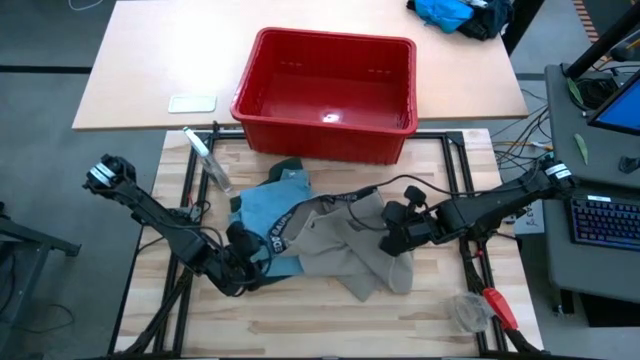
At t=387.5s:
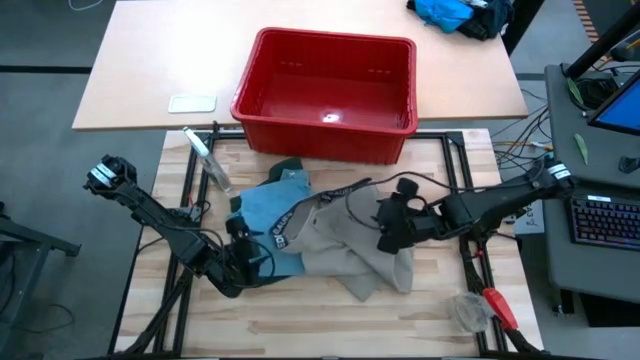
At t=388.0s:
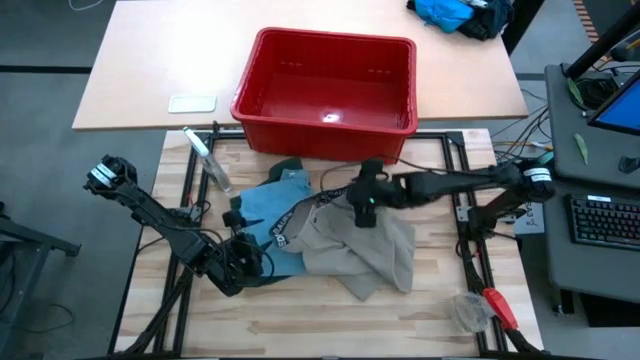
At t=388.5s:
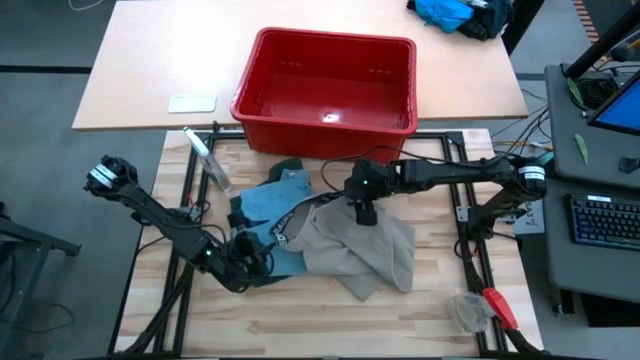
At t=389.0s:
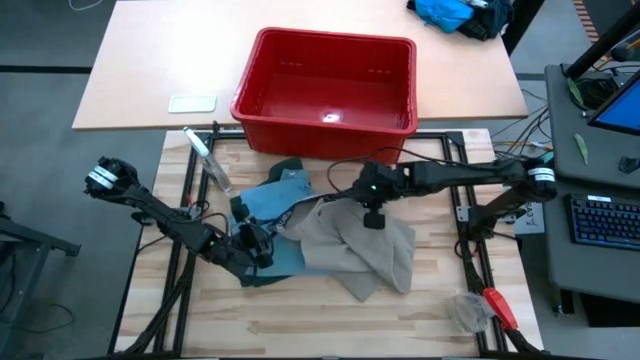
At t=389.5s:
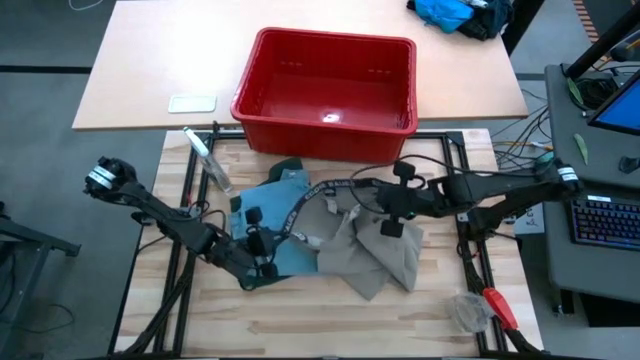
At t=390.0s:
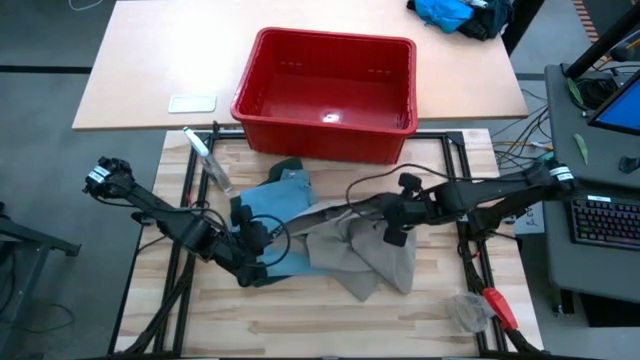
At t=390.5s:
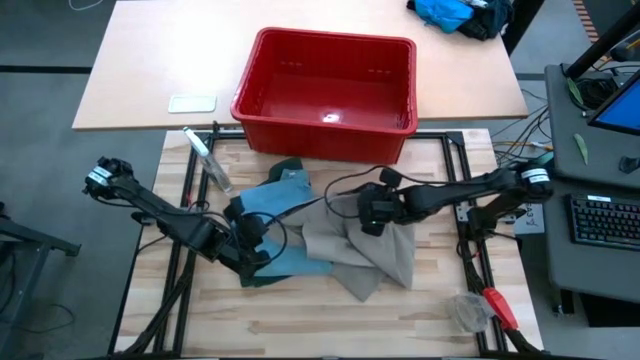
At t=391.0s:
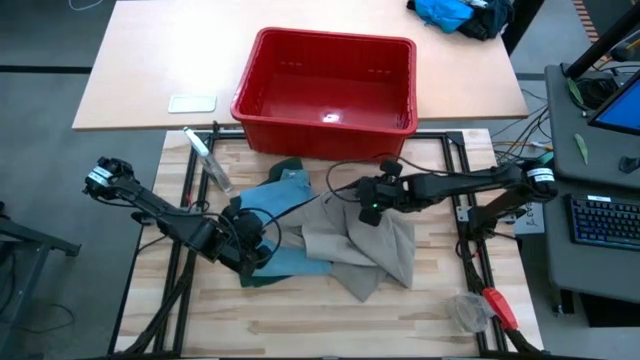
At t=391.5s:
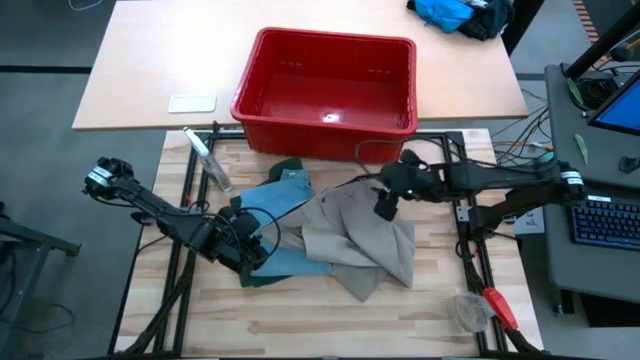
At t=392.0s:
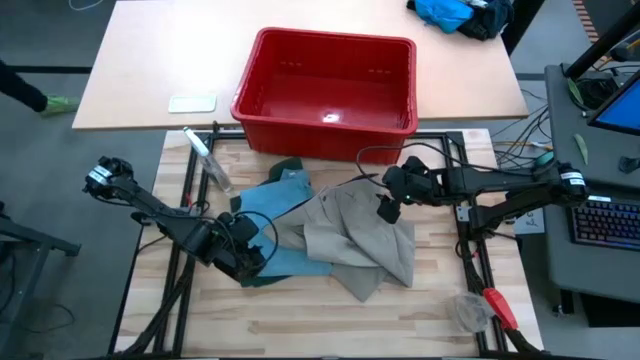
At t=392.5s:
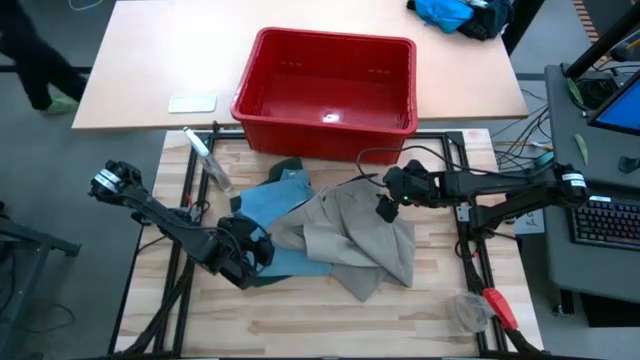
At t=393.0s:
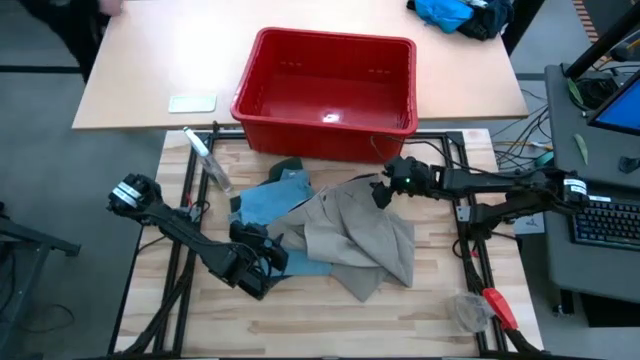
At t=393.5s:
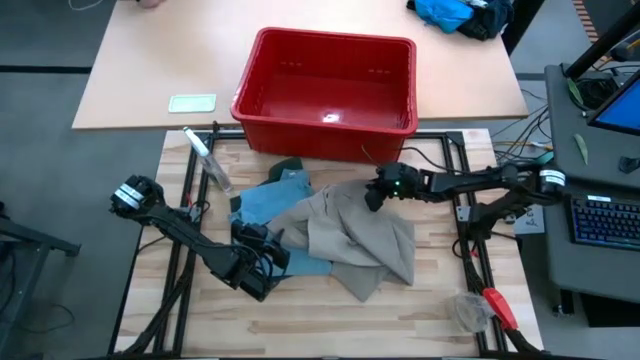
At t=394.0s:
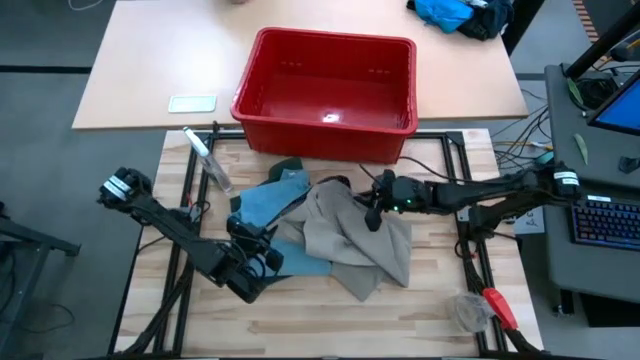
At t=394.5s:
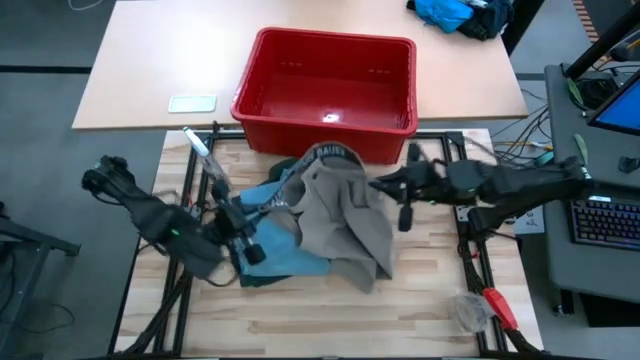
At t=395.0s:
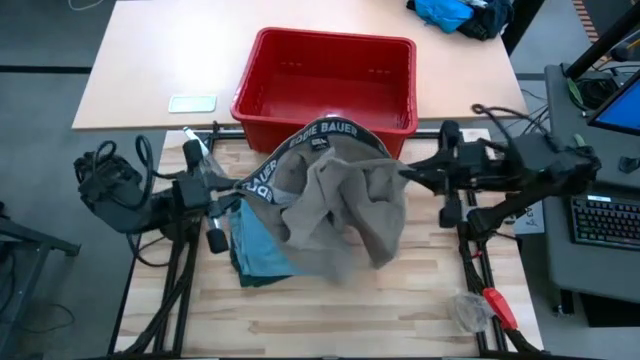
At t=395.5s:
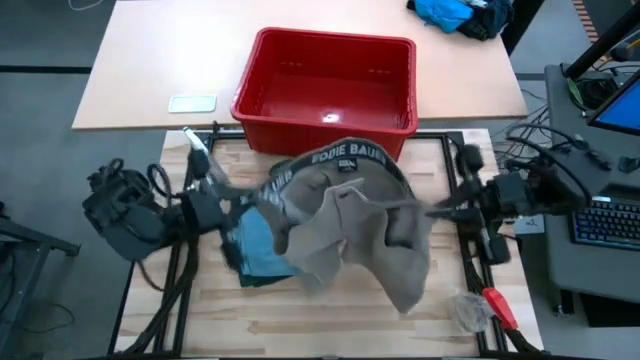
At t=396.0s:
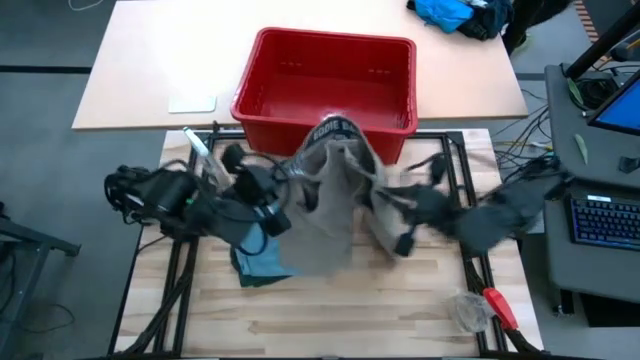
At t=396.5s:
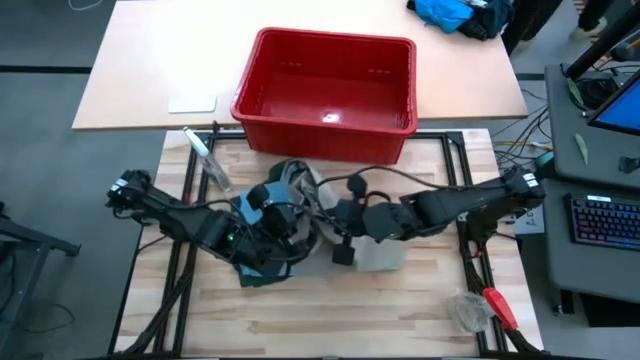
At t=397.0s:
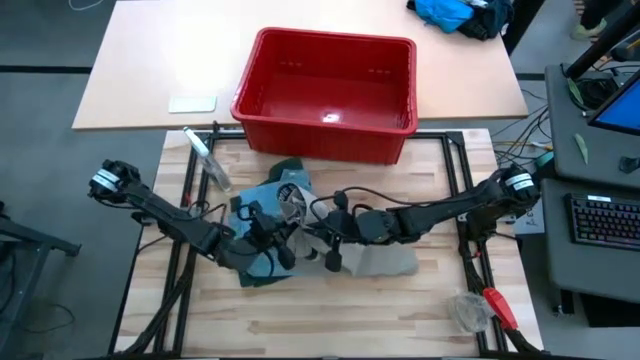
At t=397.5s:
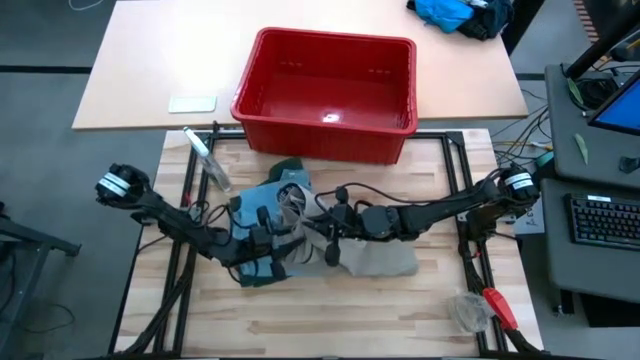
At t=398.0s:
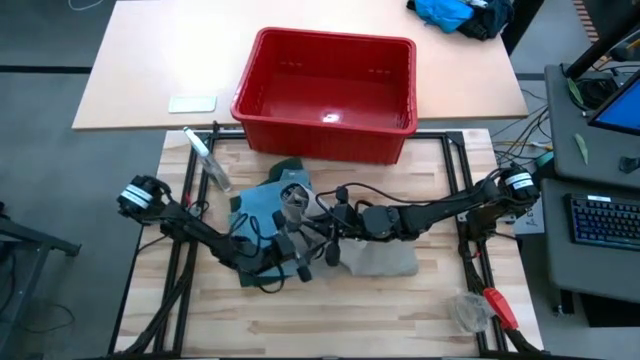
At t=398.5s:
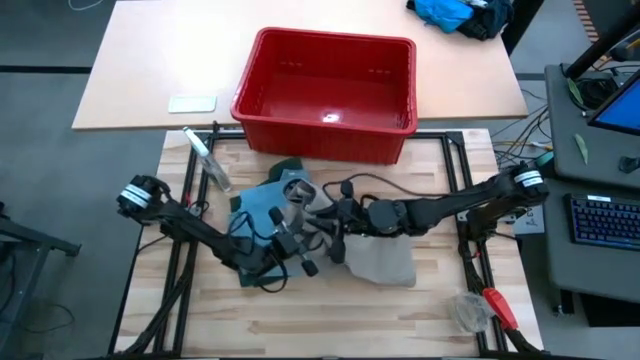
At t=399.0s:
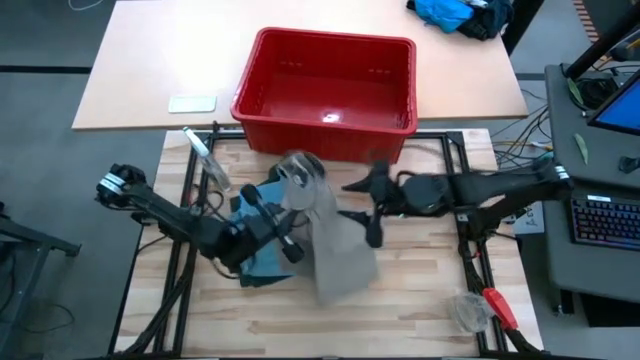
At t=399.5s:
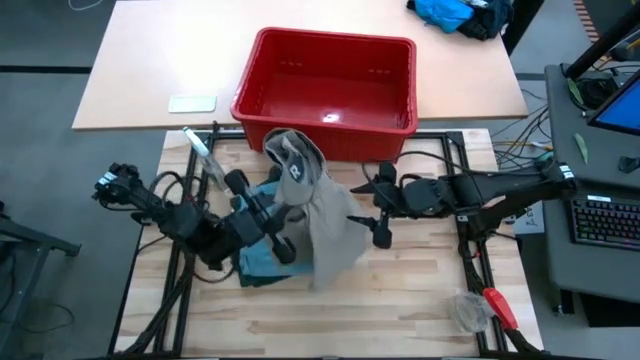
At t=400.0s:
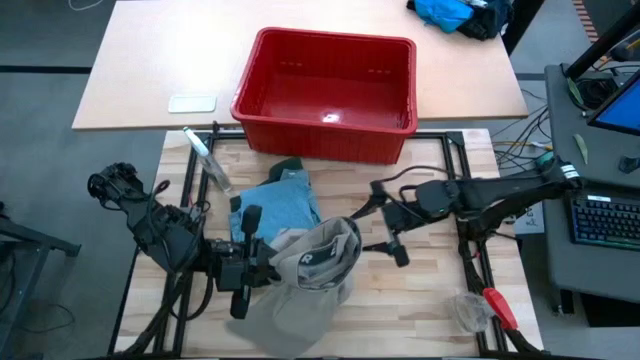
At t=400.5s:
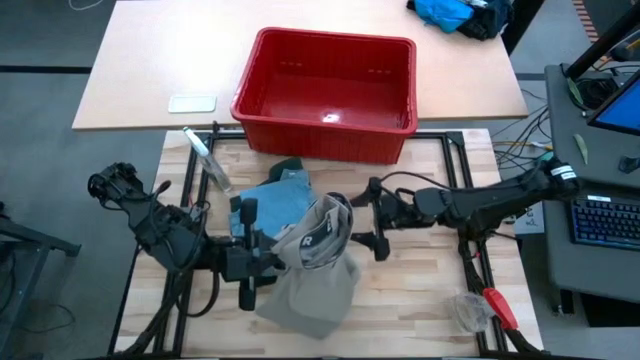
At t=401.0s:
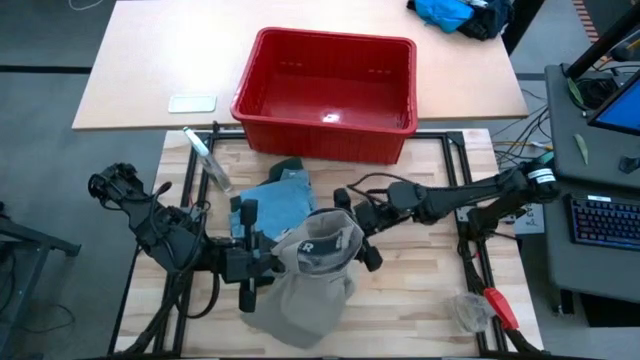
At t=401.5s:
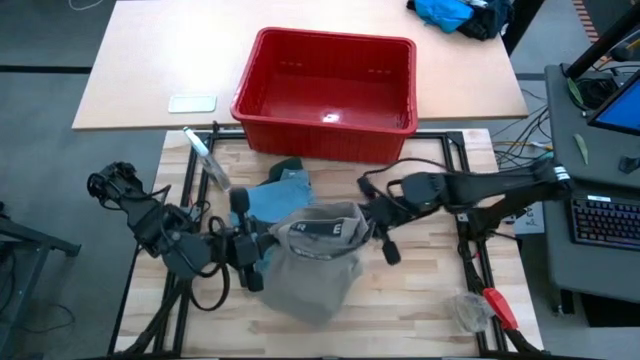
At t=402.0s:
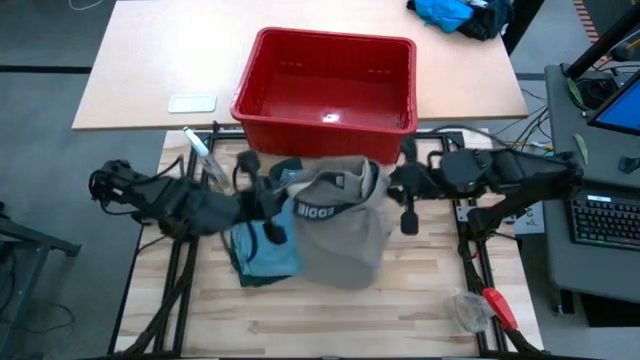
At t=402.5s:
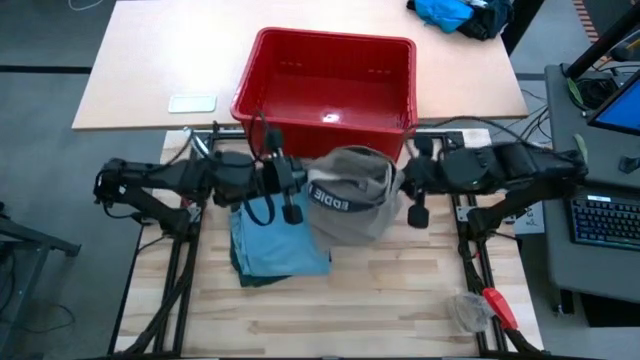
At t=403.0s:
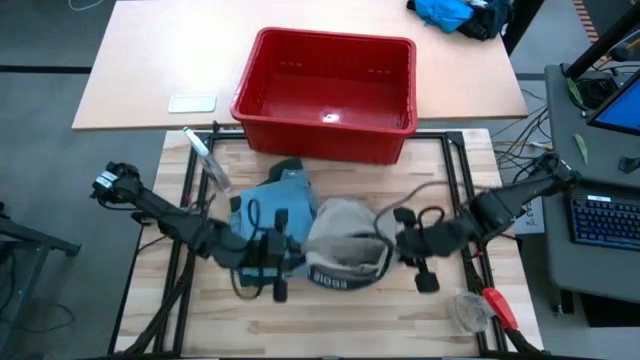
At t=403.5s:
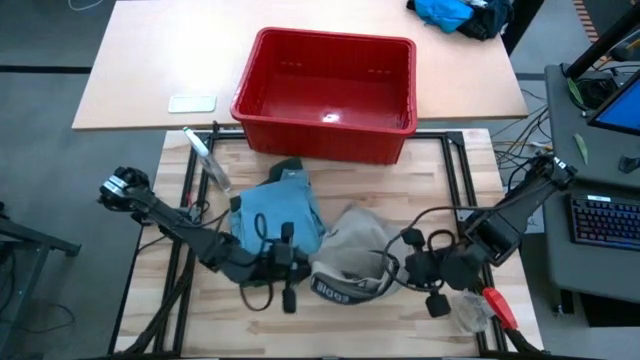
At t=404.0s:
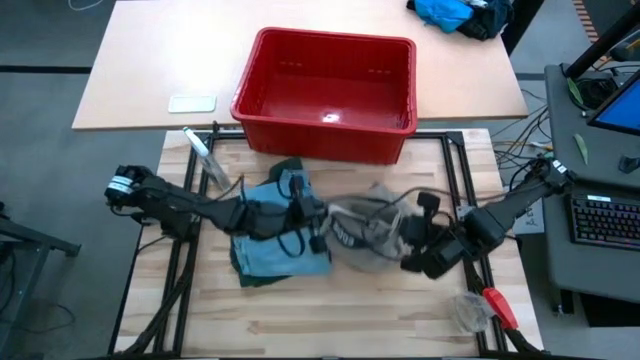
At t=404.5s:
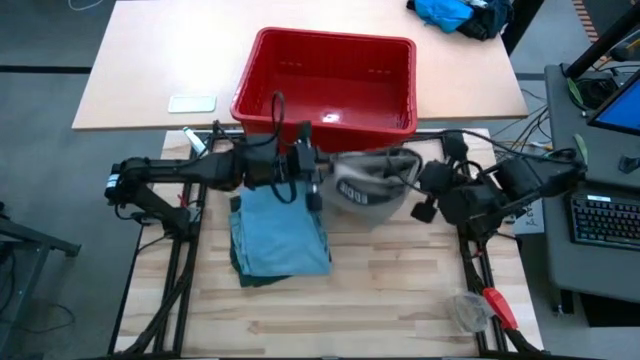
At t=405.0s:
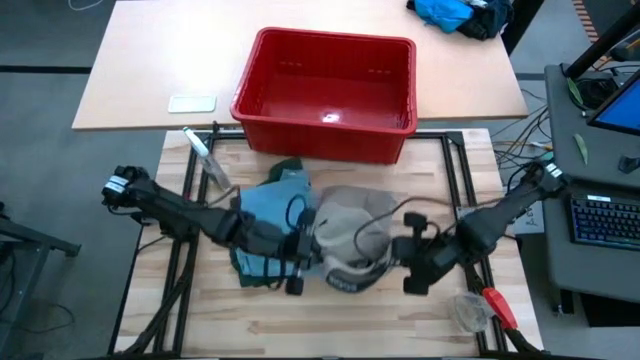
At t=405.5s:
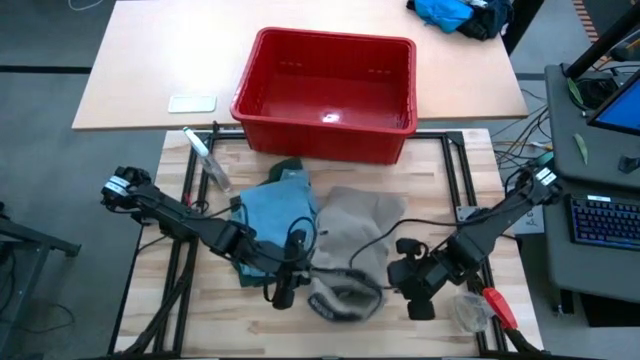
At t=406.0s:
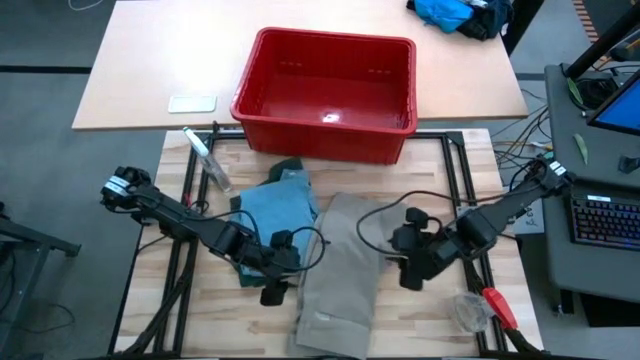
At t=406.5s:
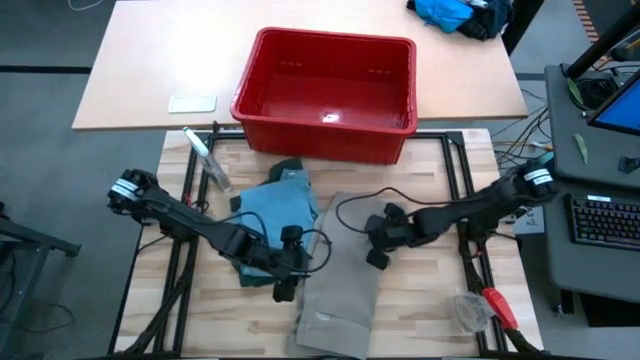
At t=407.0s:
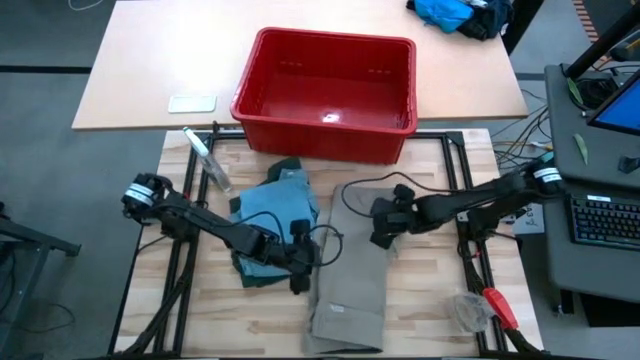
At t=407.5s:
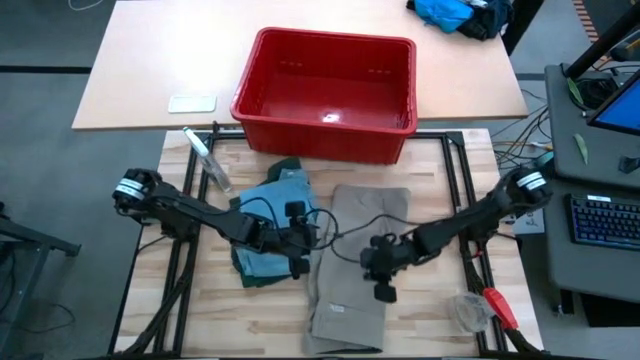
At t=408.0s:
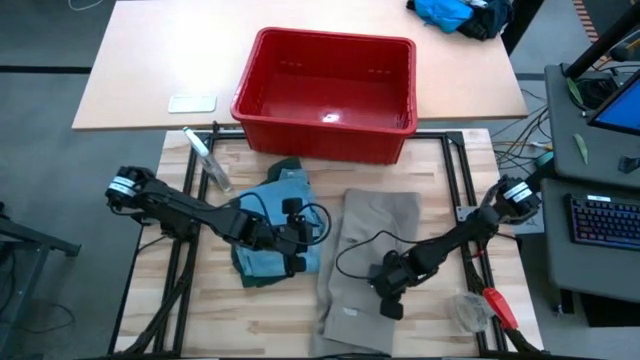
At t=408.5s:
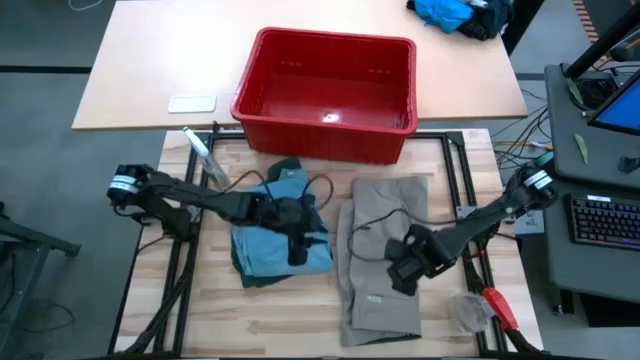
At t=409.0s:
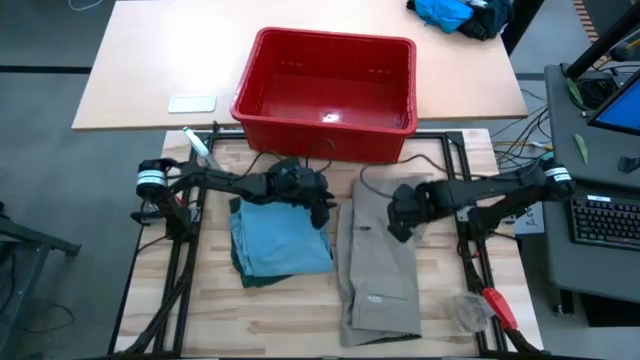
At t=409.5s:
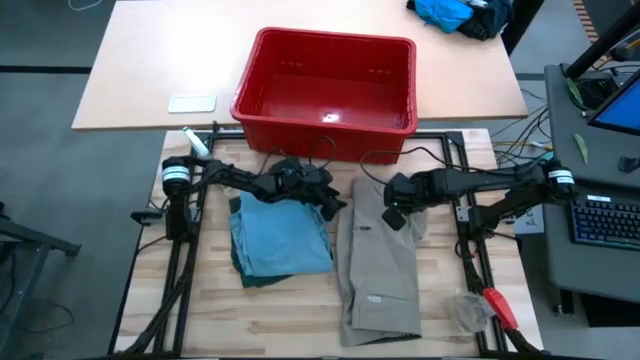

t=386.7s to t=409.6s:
Task: Fold Laundry from Bin
Fold the light brown shorts
